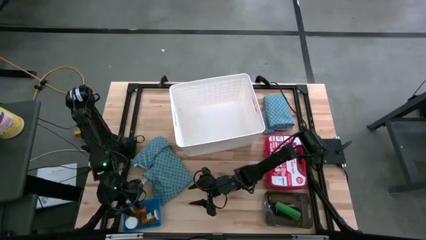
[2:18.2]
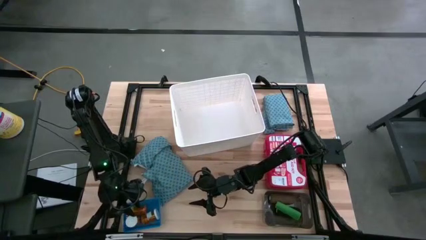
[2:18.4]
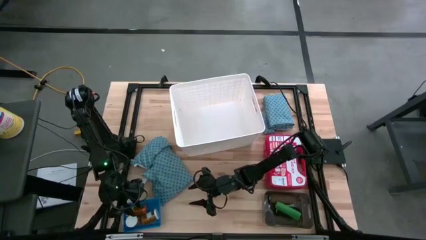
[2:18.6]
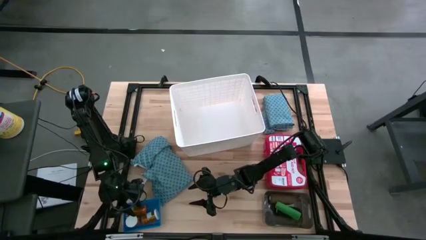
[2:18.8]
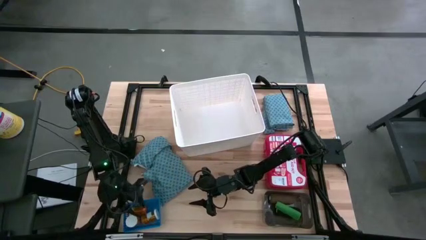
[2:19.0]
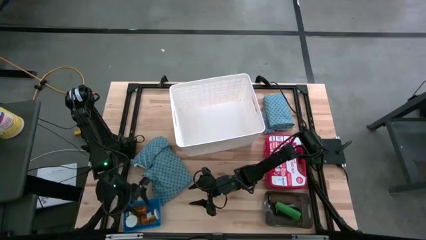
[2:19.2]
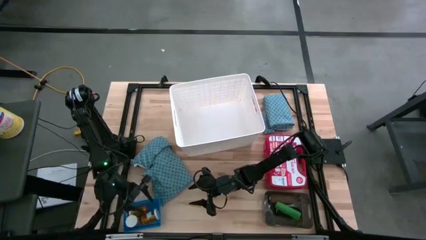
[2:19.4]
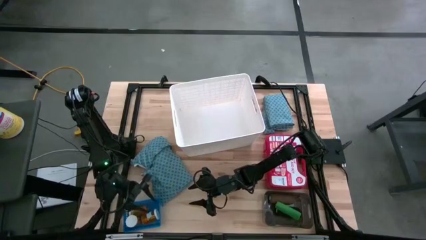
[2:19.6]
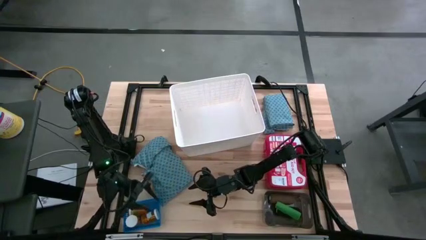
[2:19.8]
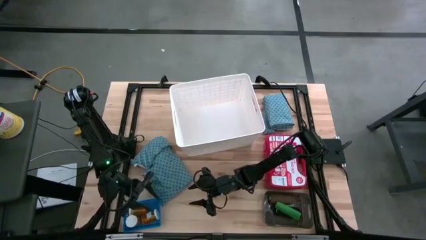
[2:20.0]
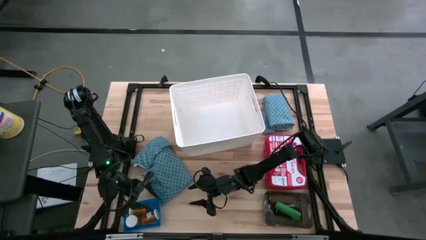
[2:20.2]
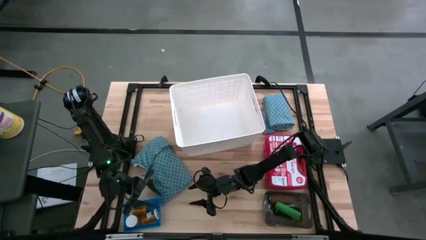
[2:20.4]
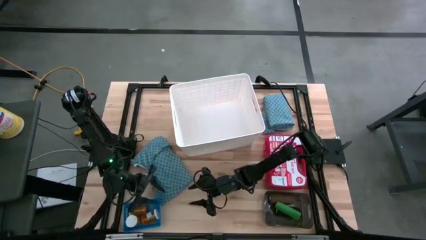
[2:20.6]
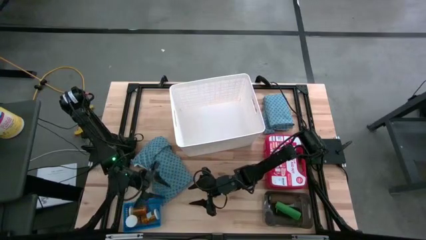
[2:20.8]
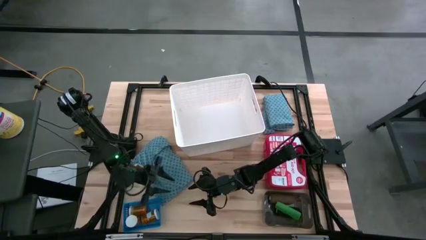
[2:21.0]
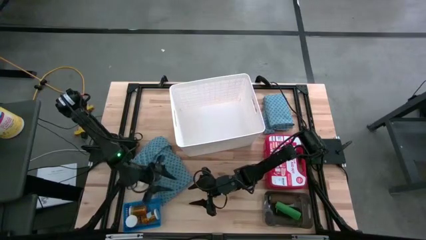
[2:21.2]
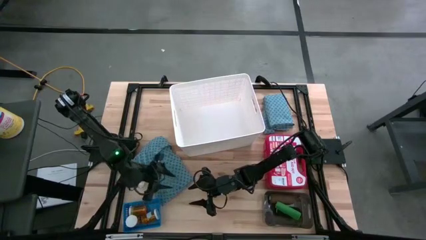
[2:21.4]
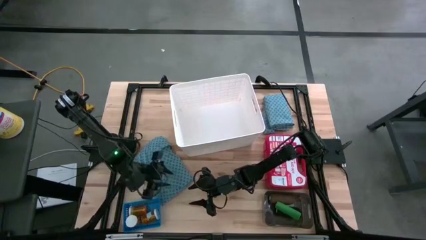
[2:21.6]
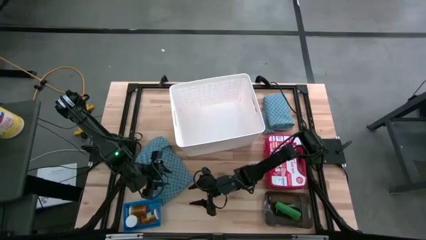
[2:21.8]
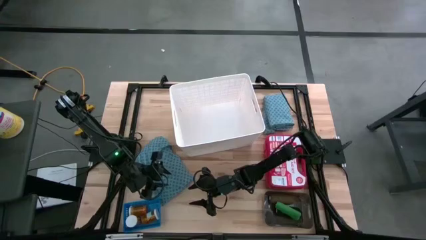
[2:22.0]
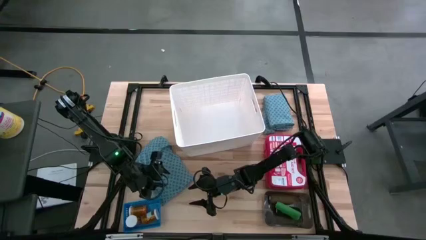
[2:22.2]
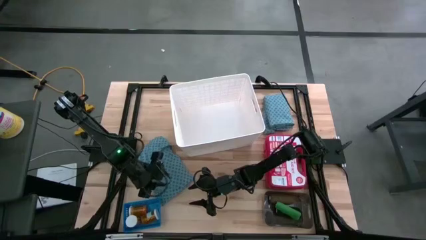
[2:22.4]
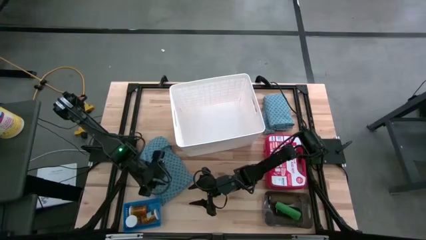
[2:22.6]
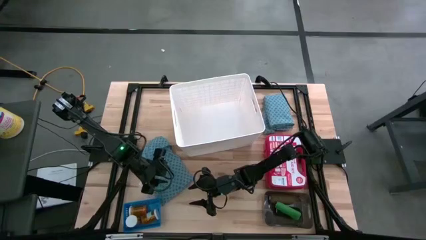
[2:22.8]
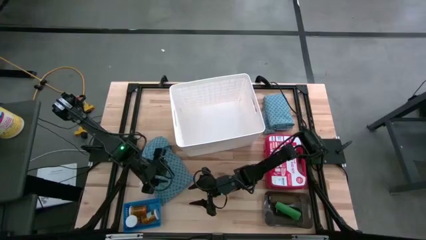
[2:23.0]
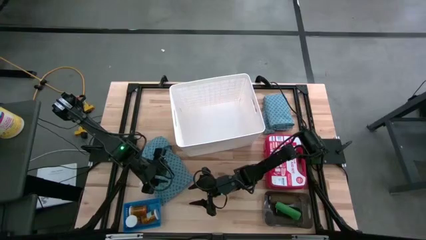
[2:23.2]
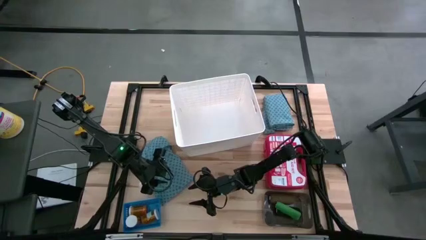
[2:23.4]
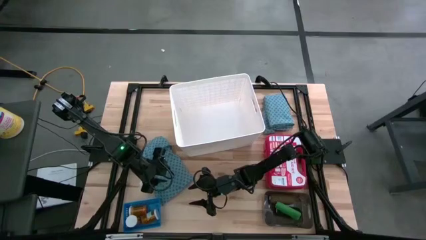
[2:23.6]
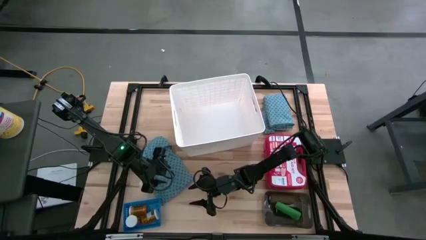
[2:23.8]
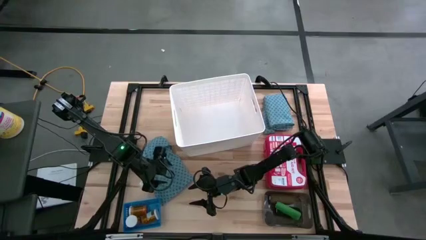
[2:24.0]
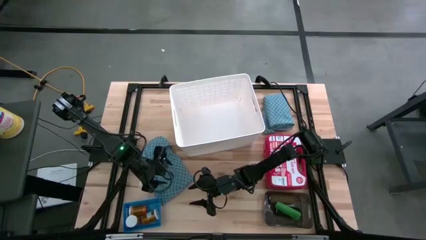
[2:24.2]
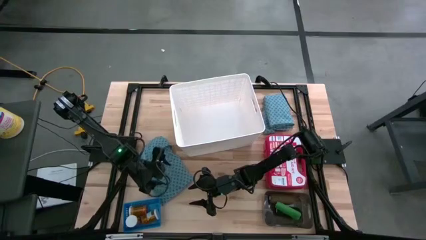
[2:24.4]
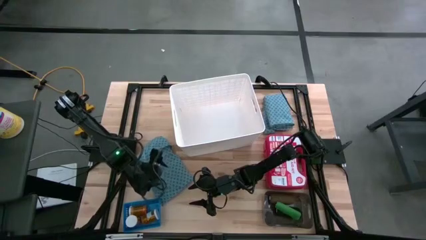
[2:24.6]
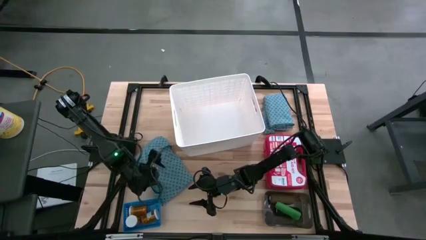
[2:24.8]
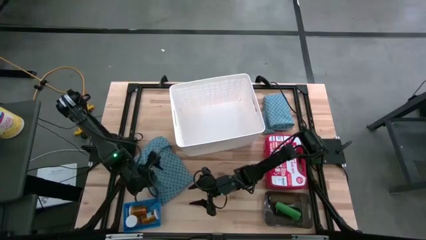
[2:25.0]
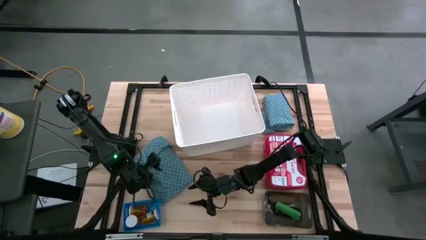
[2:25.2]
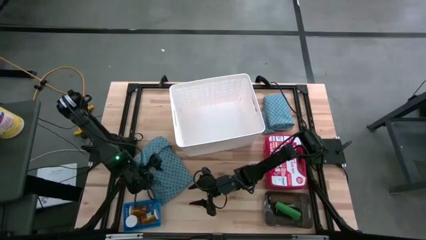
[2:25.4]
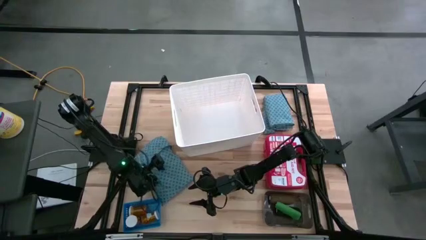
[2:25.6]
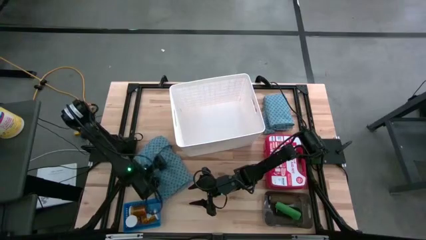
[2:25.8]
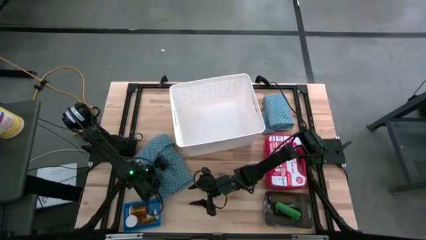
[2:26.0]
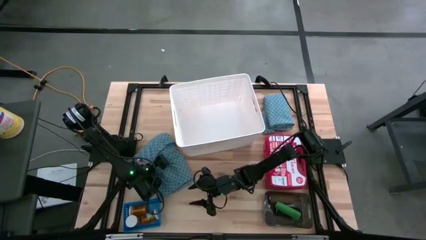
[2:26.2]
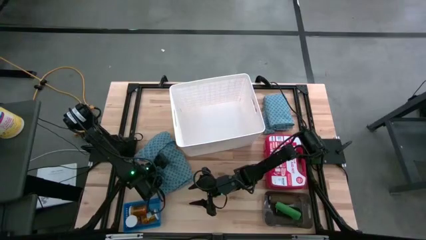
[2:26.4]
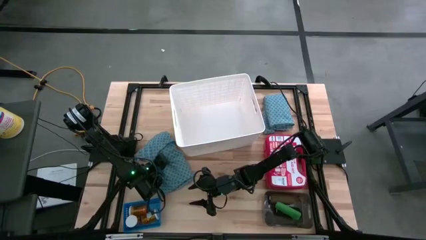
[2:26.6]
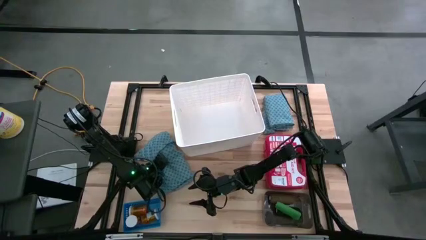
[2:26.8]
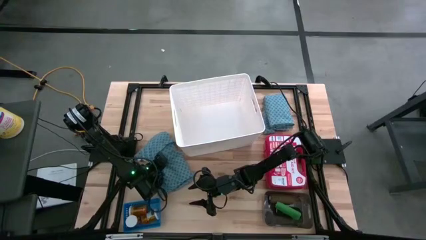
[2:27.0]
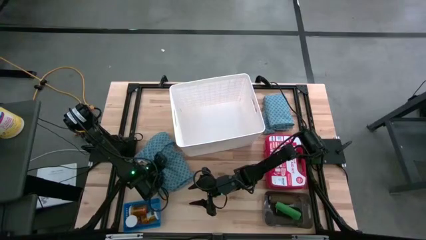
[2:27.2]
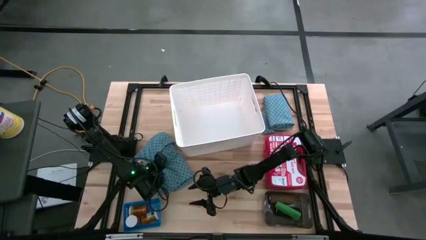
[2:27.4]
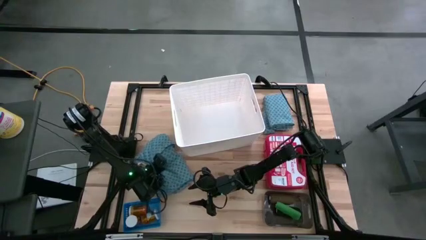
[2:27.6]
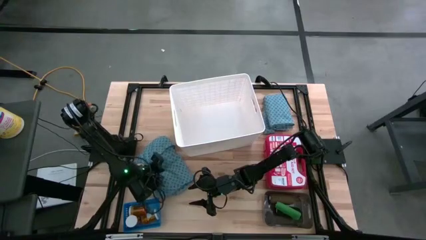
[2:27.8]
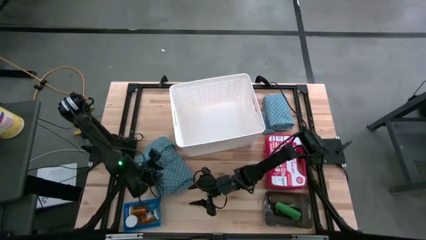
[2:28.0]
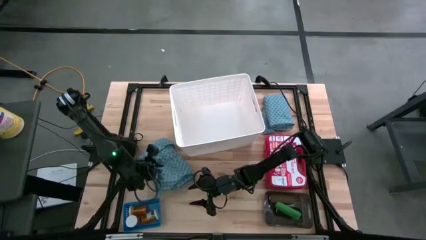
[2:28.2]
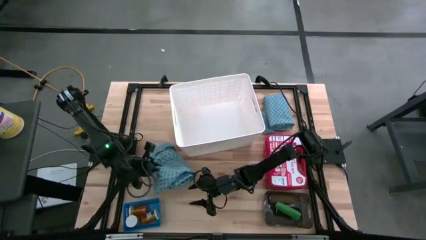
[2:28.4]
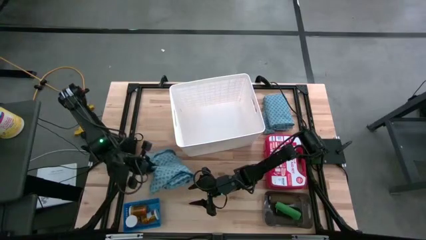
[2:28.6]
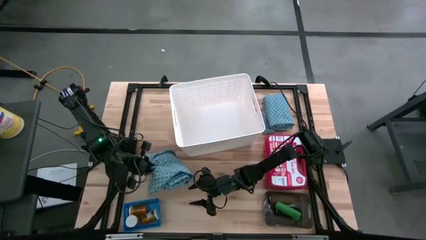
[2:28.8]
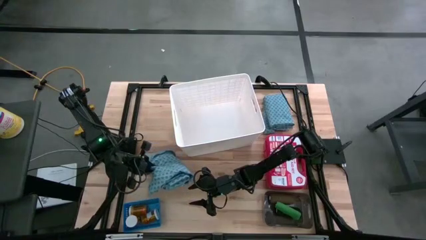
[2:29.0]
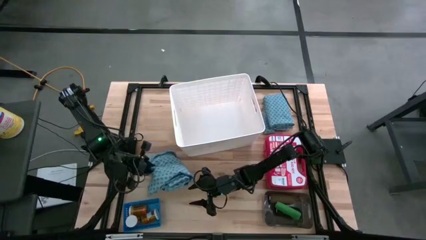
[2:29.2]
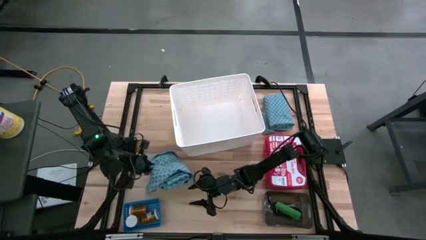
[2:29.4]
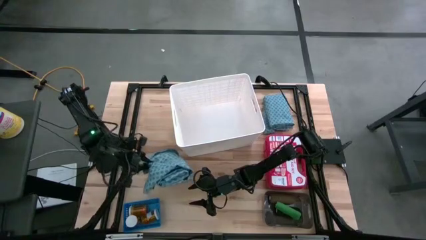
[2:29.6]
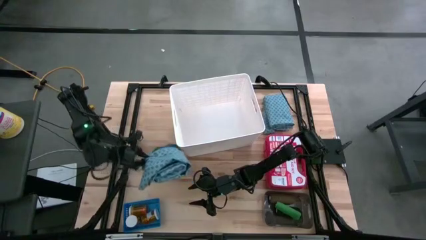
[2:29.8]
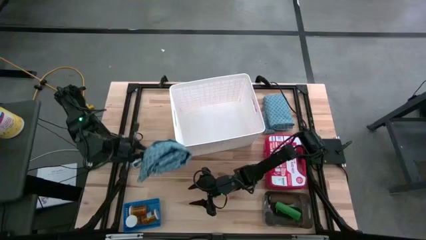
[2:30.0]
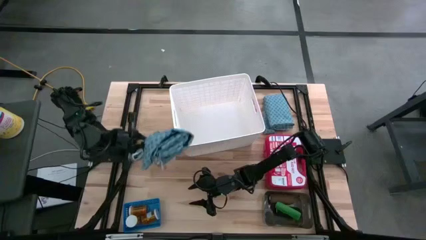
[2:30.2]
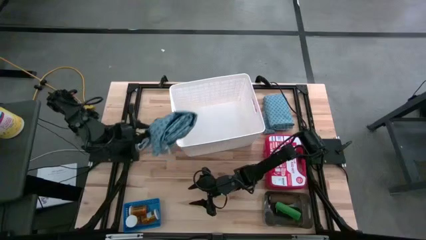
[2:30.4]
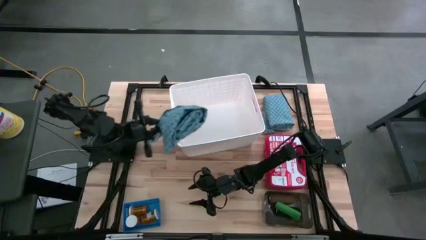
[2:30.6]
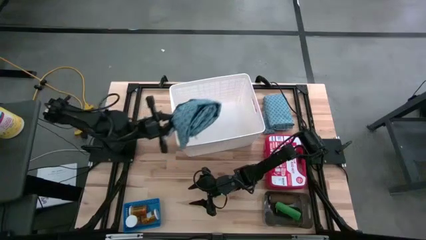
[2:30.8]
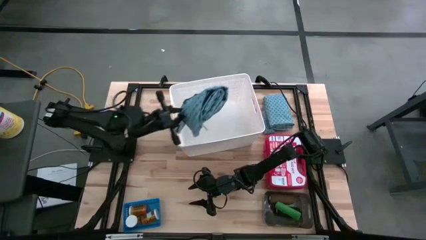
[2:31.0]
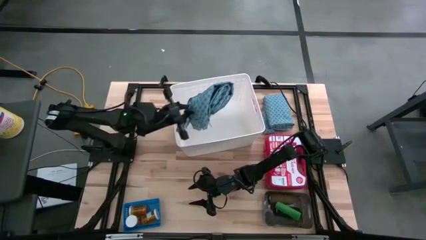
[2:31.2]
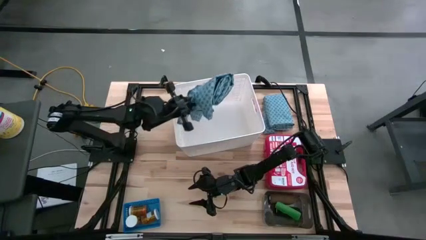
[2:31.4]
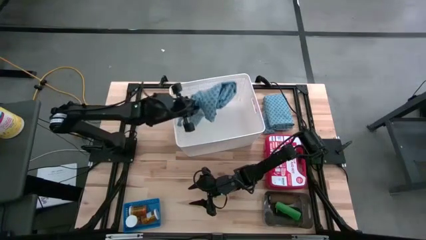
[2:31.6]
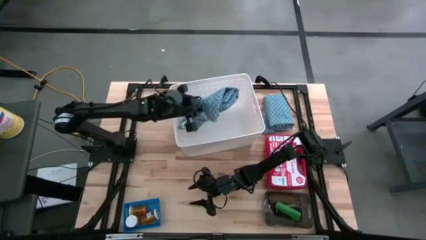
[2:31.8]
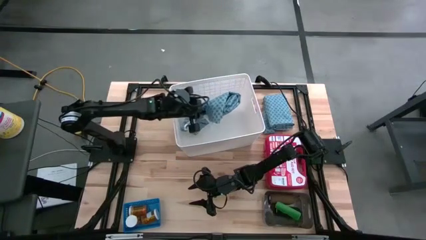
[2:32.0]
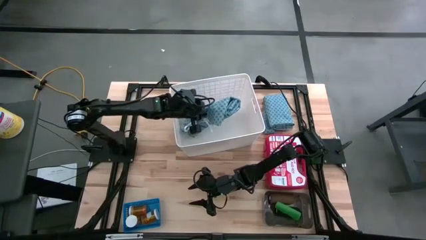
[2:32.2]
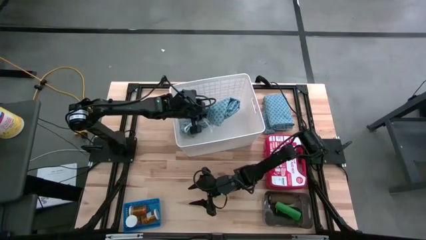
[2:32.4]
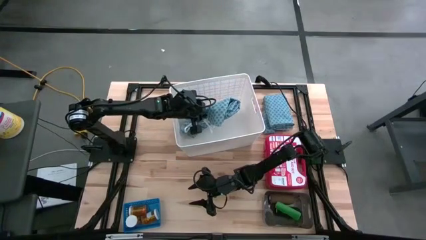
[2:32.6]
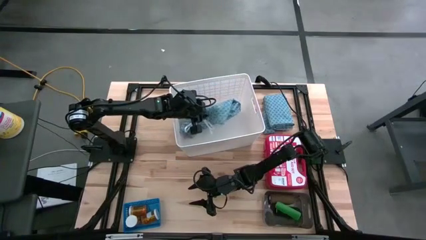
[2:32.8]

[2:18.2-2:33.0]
Task: Pick & place medical supplies in basket/bin
Put the left patient gown into the white bin

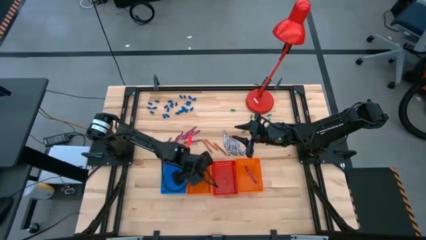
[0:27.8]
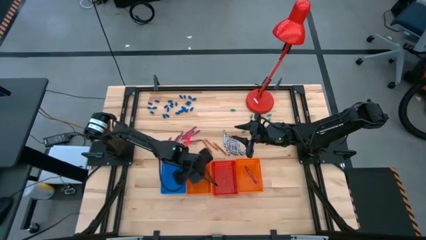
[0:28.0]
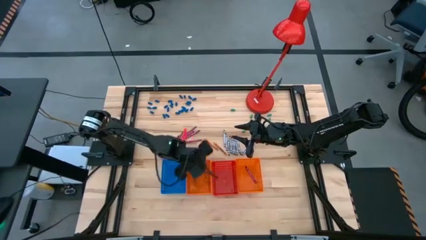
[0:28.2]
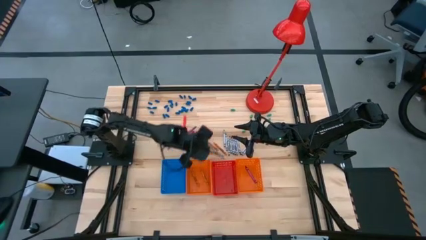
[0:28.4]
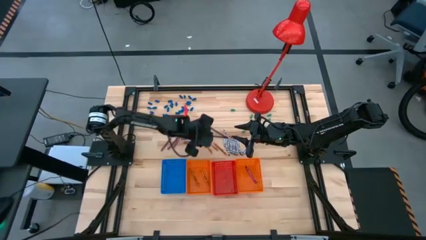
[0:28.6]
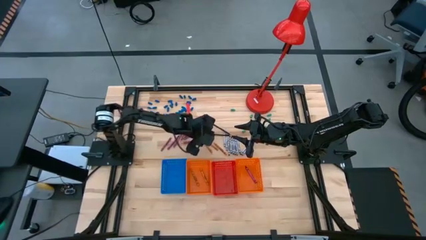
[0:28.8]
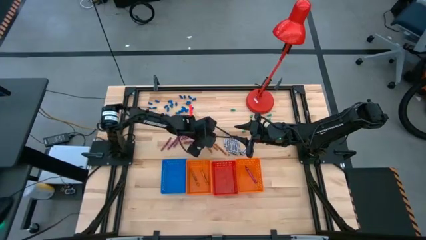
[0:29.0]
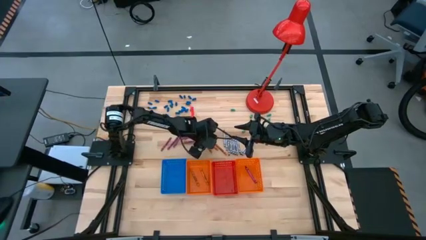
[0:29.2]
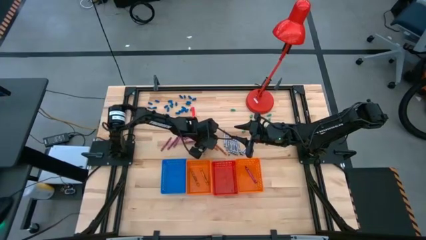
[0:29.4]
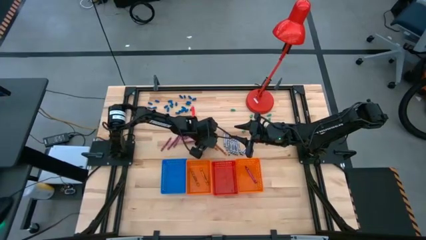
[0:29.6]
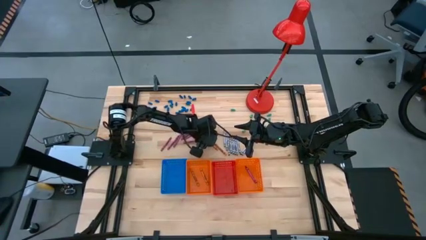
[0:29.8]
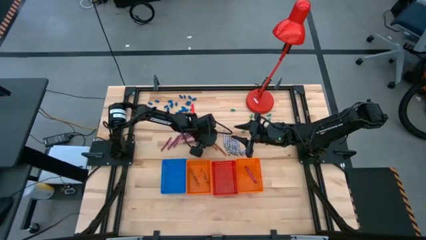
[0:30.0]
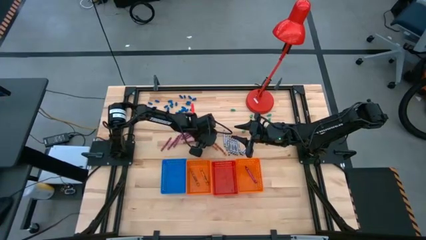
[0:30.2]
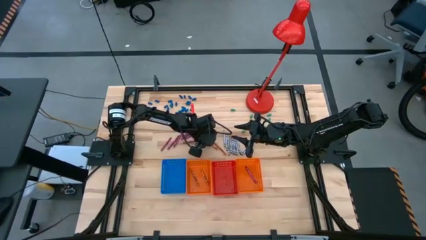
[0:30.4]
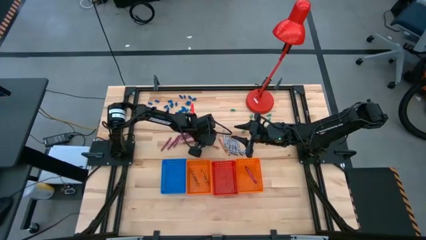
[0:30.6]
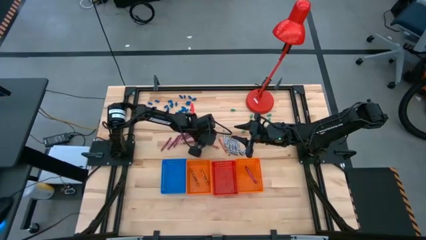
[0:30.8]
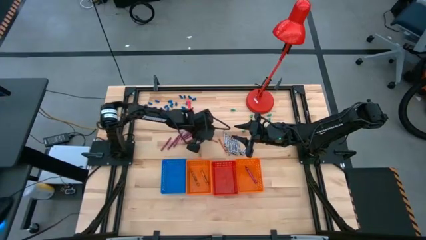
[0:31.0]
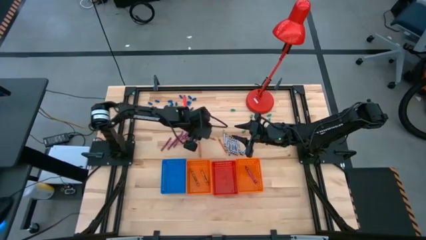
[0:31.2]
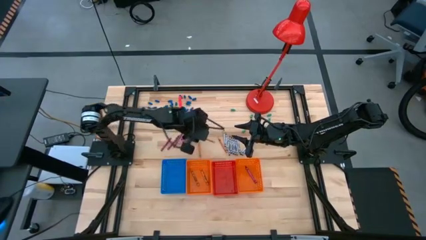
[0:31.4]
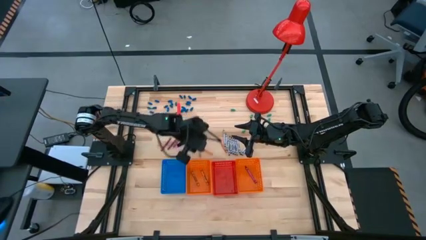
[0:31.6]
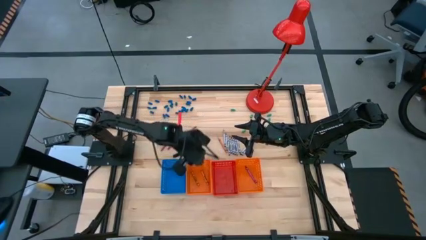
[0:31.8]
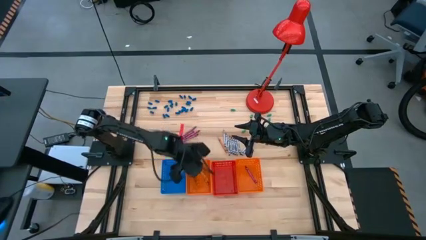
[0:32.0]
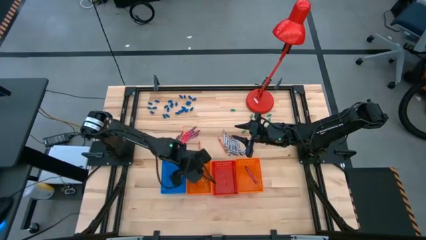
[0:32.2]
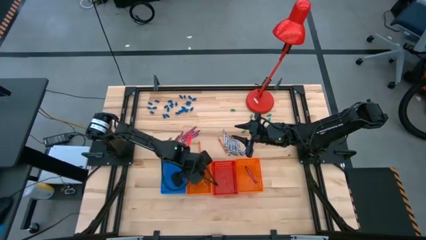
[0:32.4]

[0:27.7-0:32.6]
Task: Sort crayons
Put the orange crayon into the left orange bin
